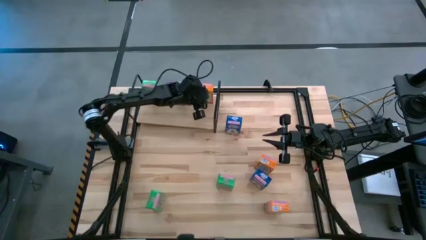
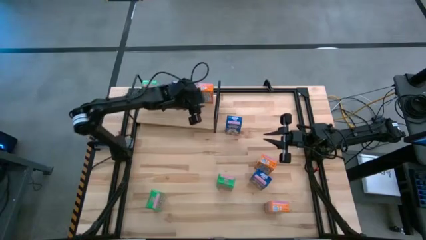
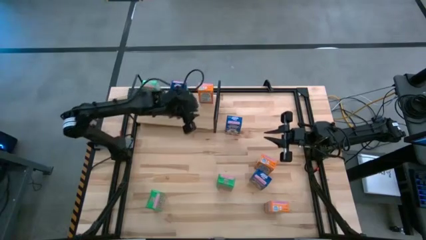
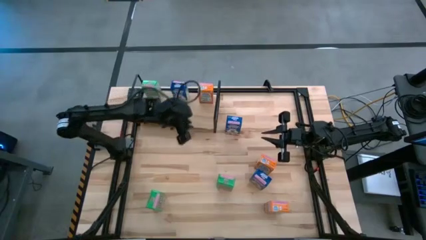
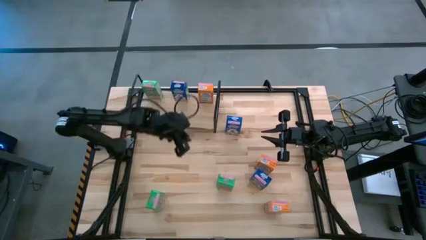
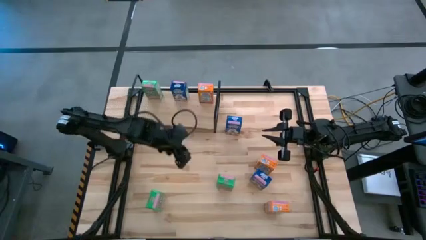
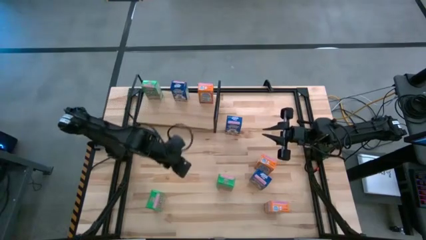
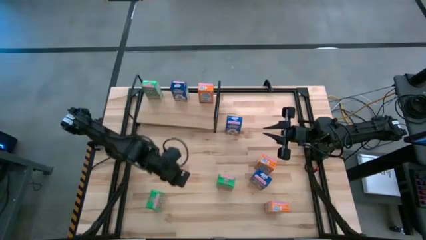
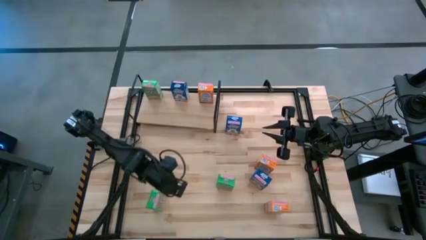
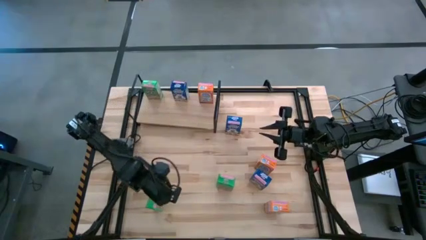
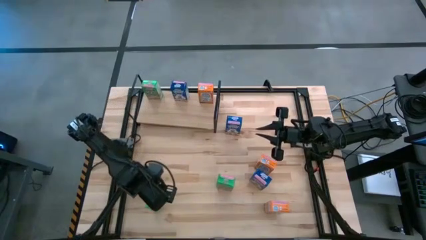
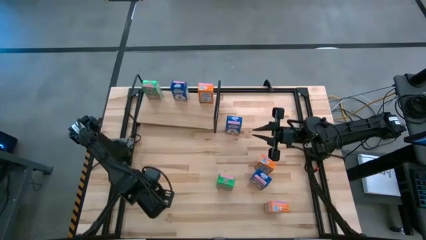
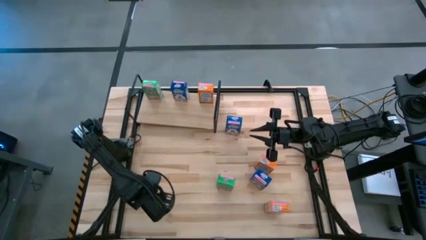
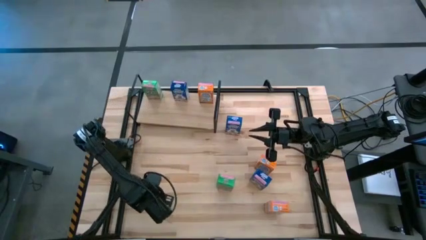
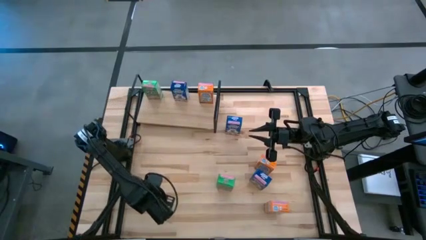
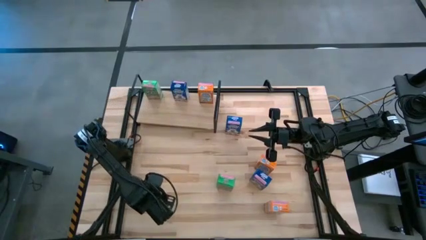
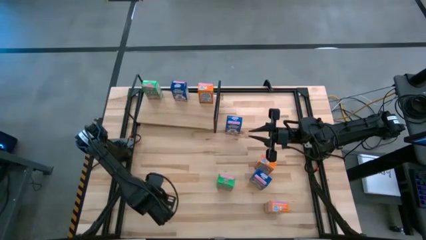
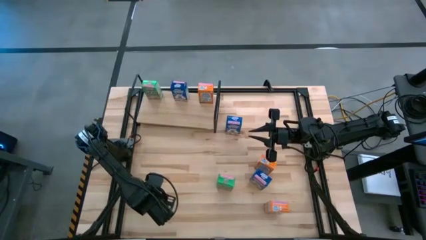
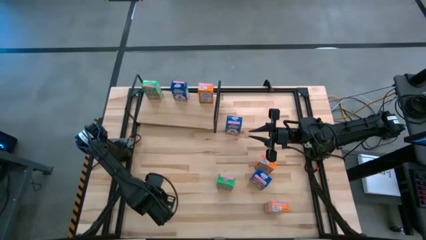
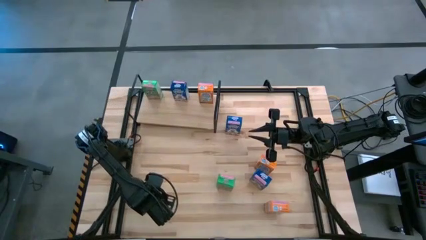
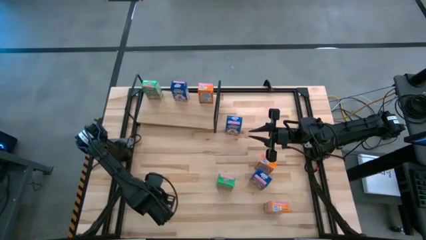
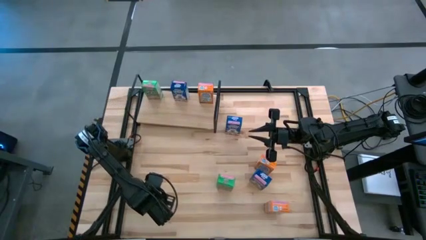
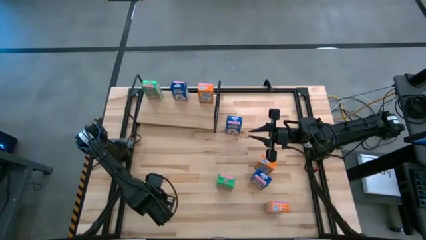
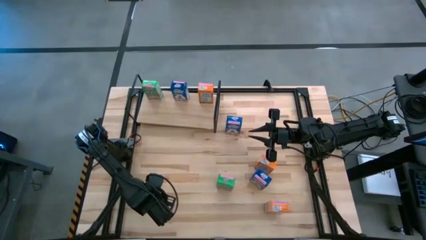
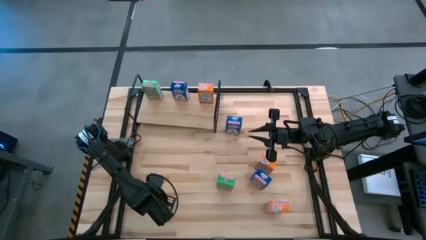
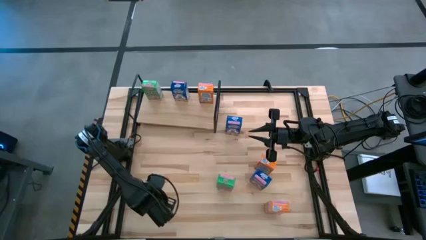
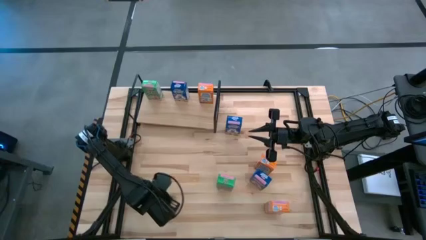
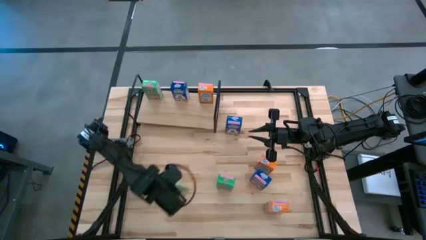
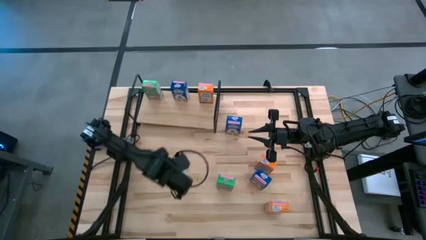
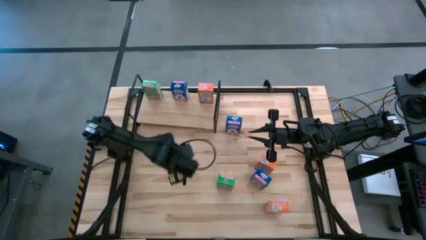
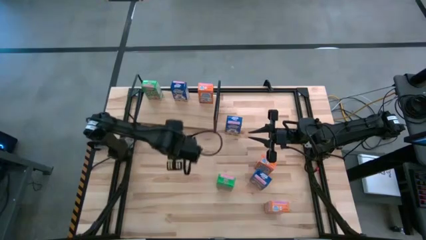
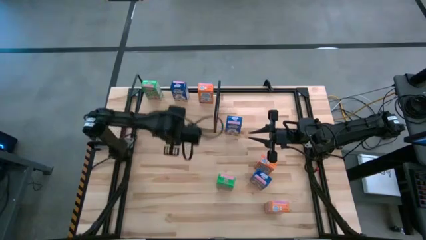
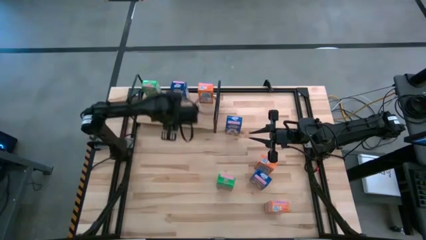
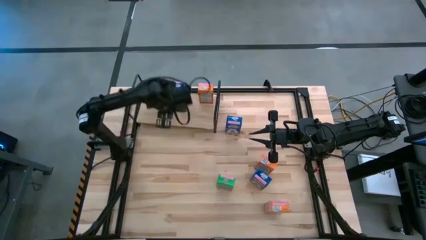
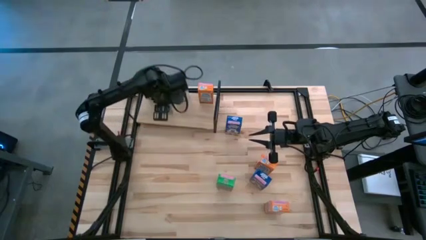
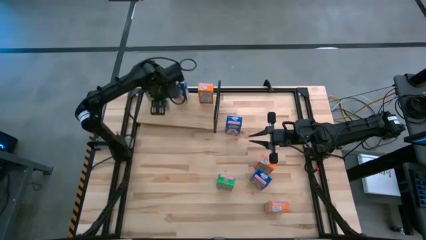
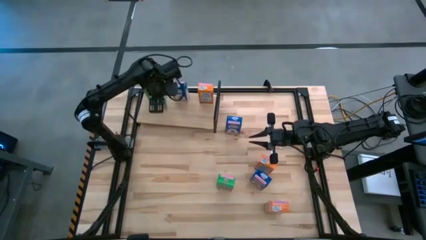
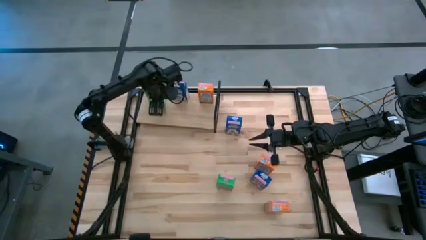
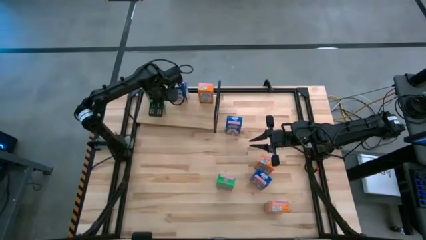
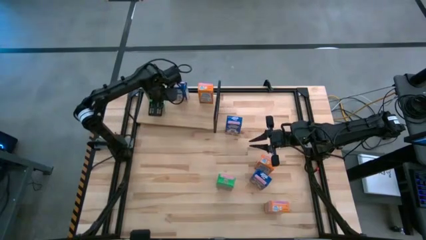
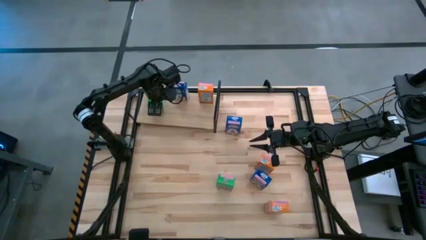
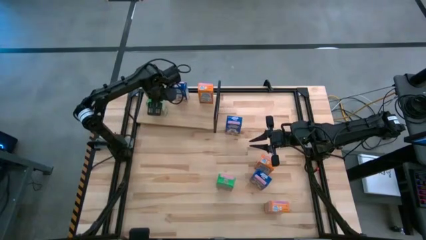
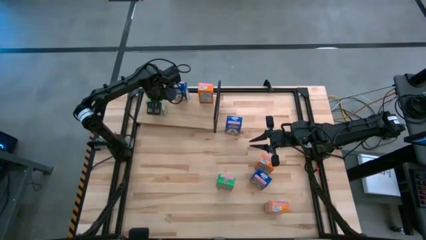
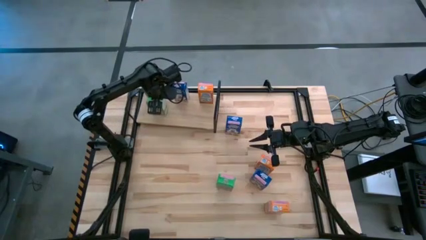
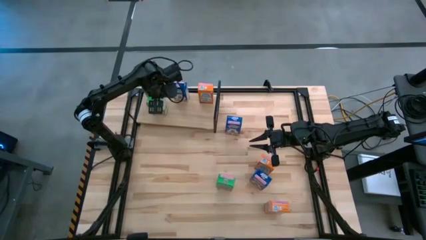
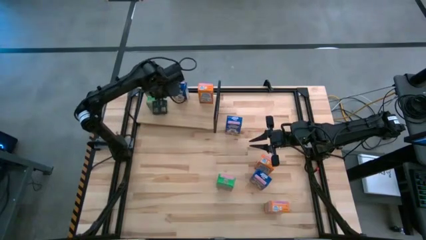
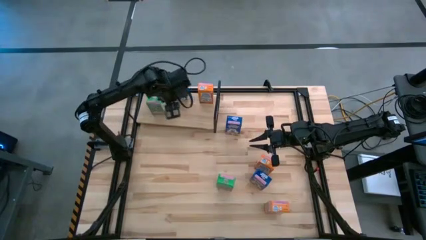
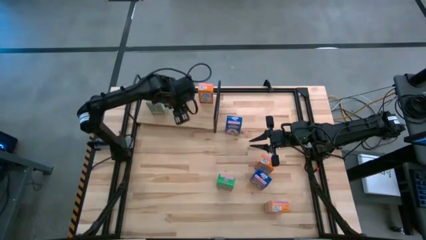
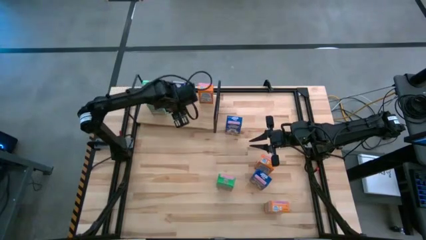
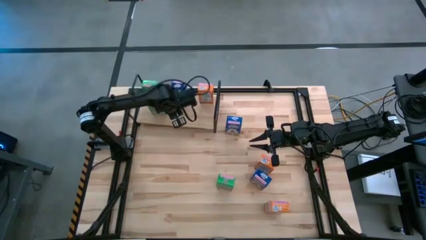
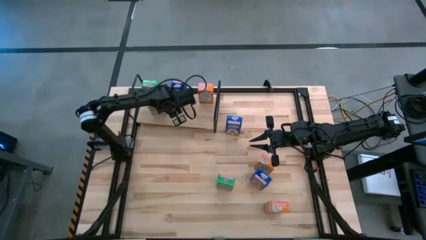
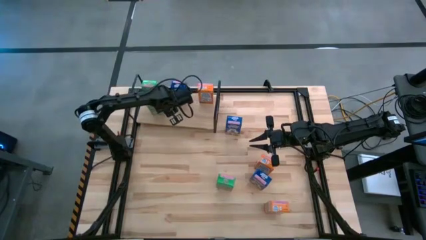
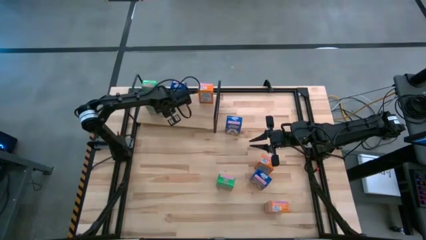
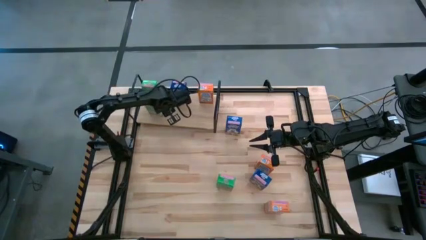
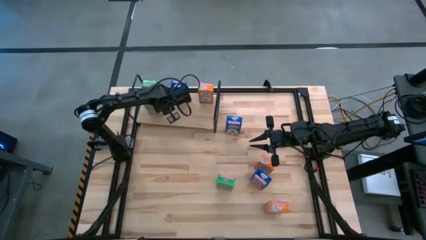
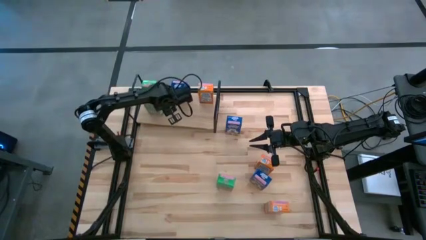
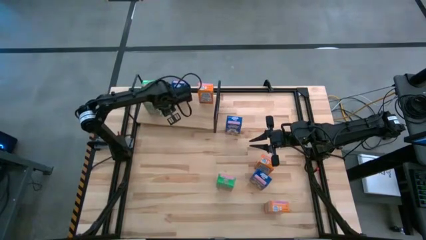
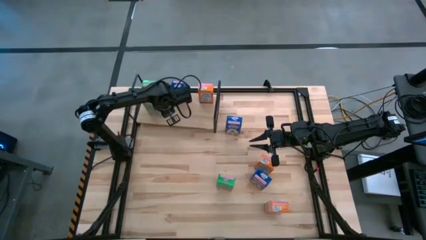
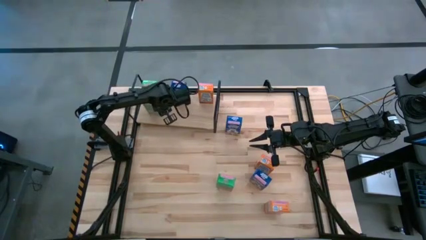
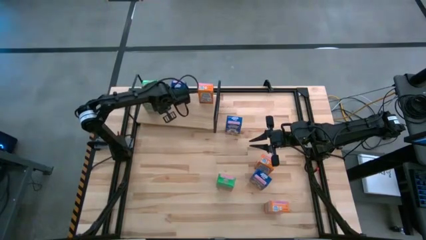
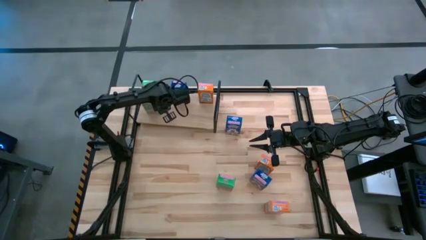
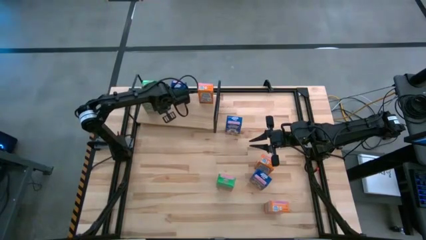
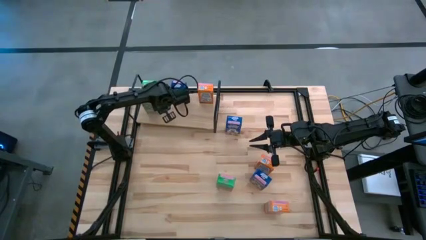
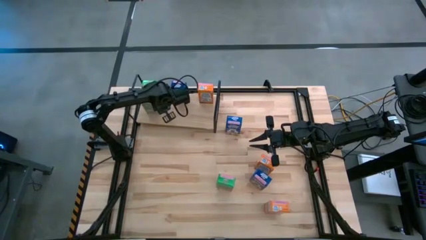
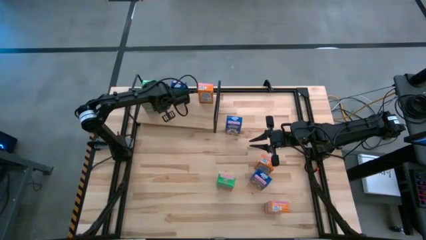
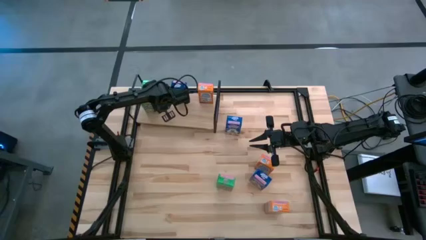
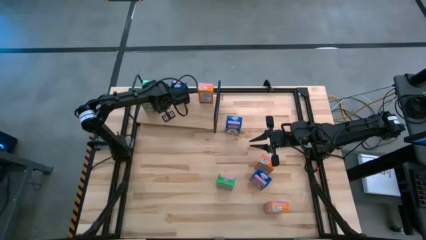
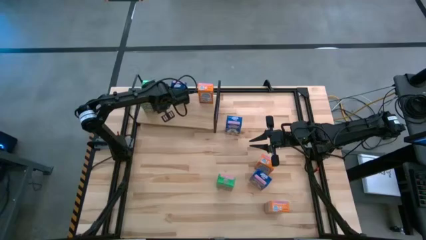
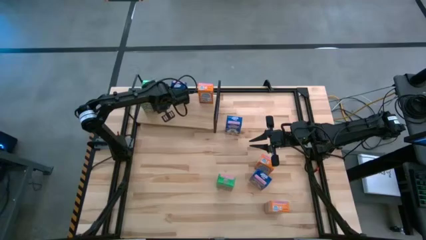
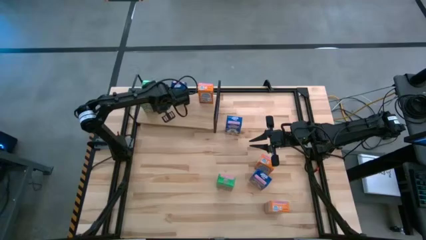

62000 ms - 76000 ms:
Task: Stack cereal on shelf
Put the left green cereal box on the shelf aligned with the green cereal box
